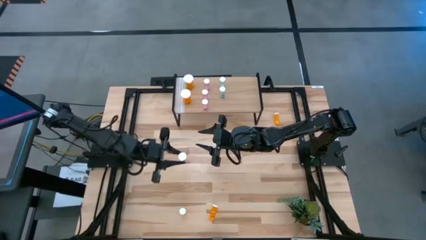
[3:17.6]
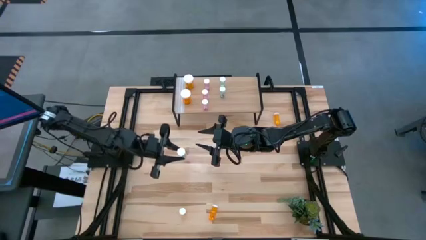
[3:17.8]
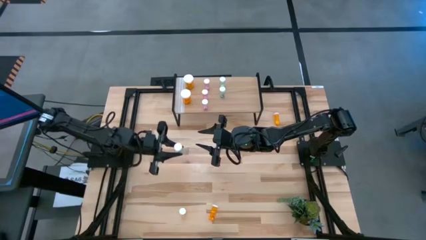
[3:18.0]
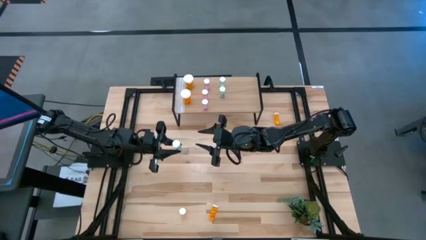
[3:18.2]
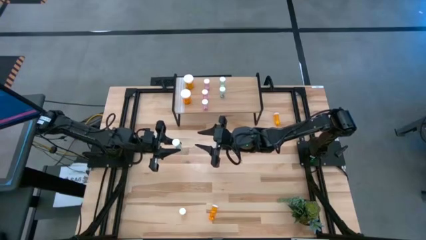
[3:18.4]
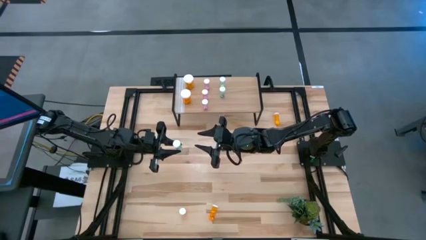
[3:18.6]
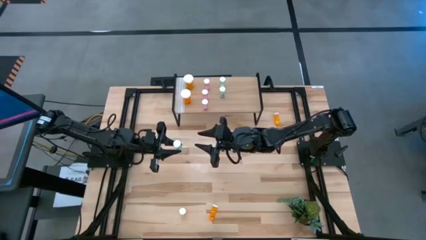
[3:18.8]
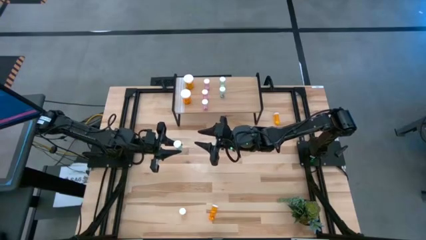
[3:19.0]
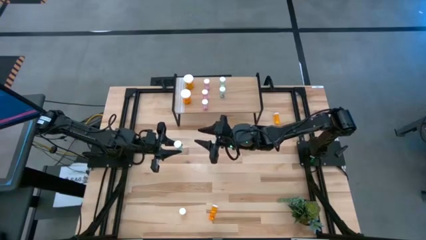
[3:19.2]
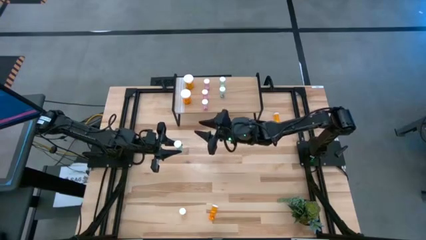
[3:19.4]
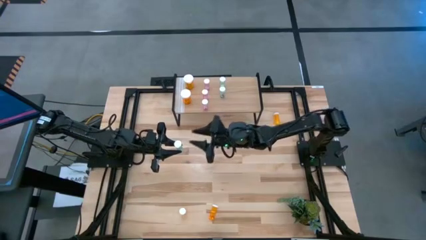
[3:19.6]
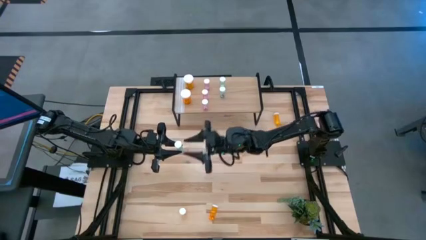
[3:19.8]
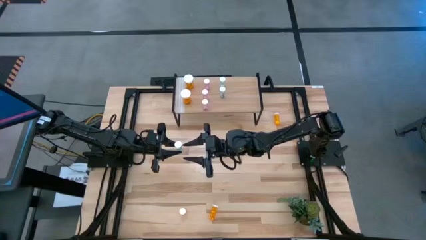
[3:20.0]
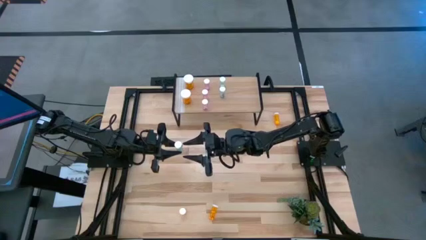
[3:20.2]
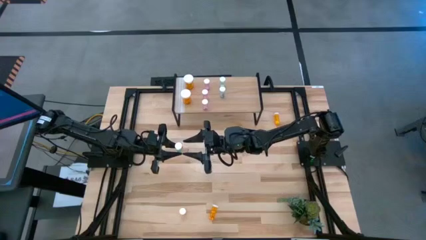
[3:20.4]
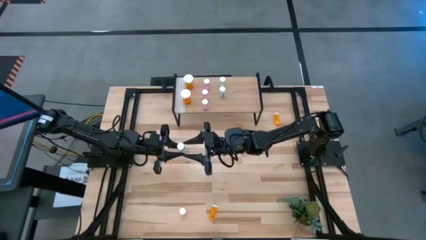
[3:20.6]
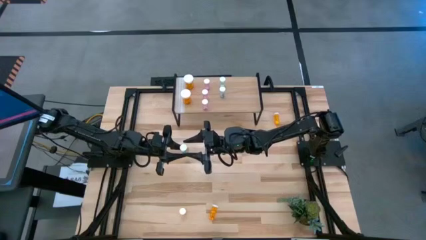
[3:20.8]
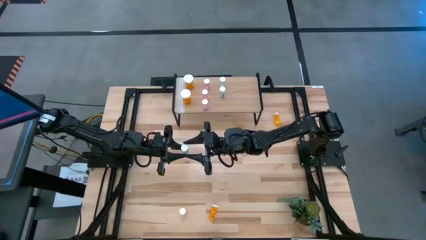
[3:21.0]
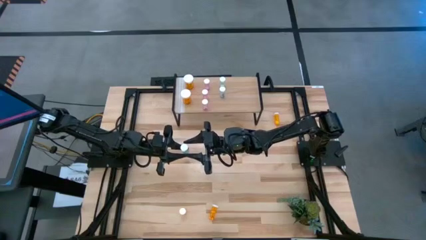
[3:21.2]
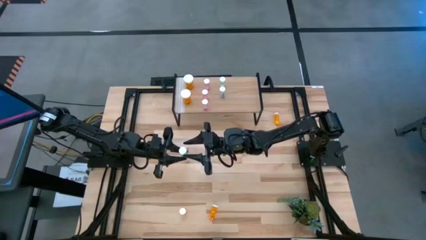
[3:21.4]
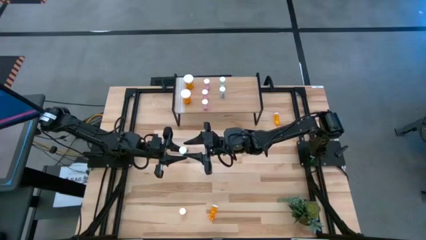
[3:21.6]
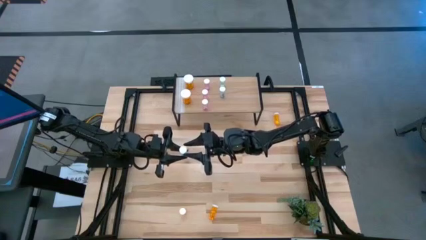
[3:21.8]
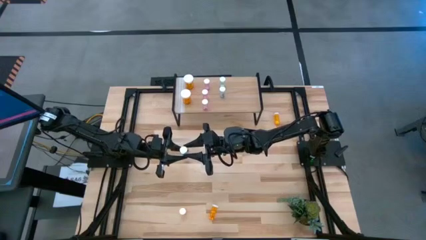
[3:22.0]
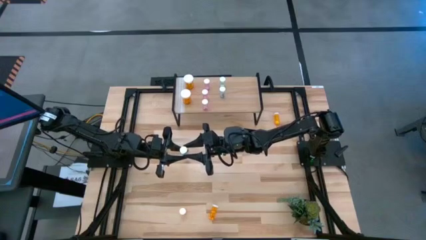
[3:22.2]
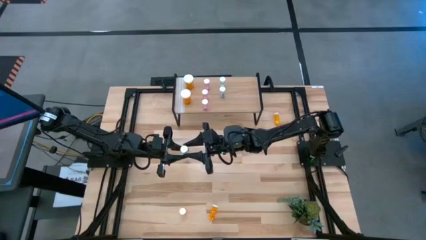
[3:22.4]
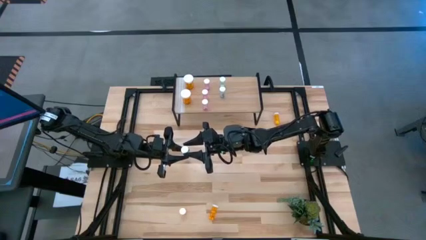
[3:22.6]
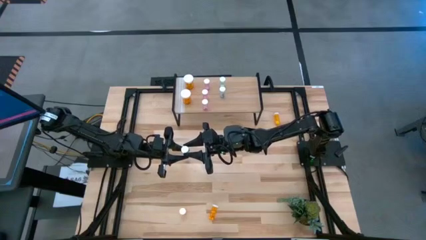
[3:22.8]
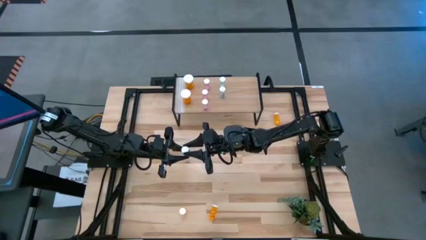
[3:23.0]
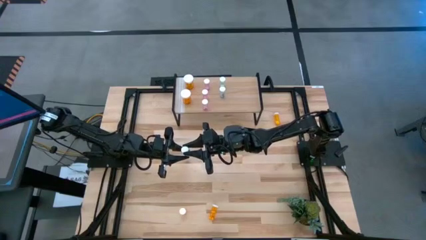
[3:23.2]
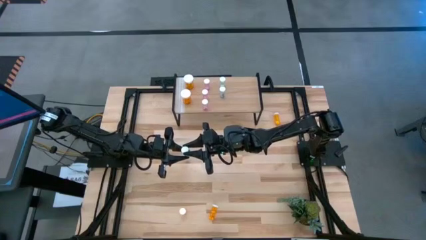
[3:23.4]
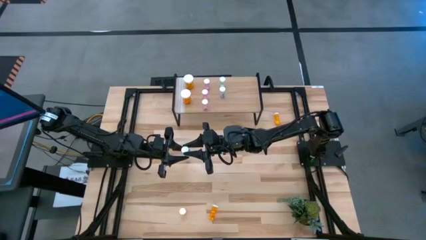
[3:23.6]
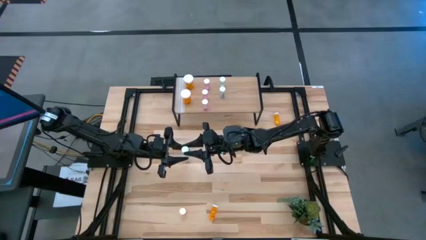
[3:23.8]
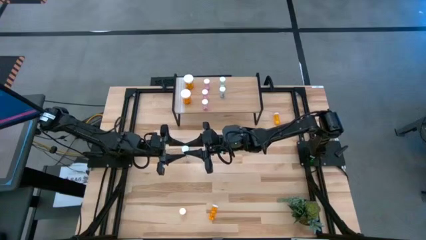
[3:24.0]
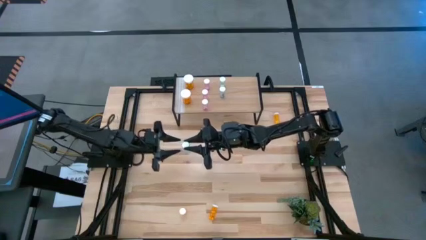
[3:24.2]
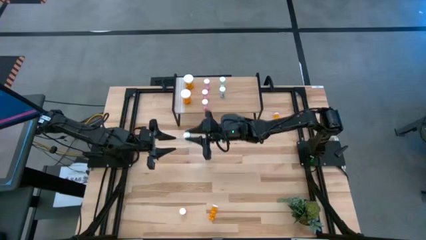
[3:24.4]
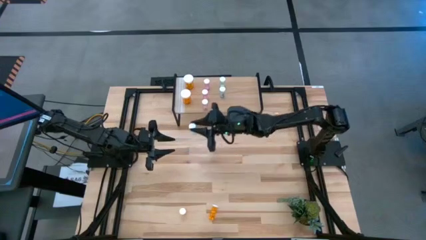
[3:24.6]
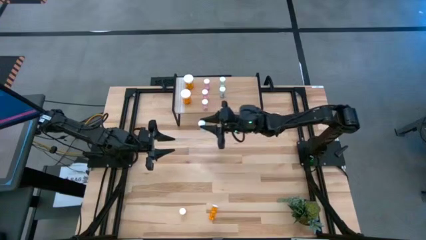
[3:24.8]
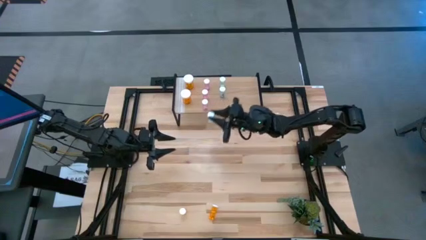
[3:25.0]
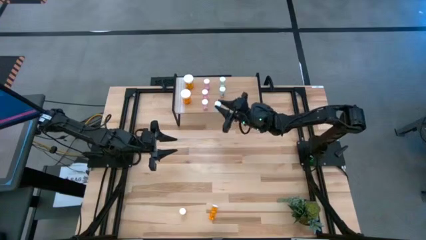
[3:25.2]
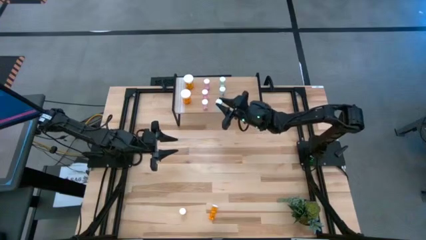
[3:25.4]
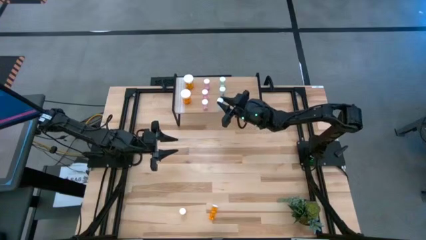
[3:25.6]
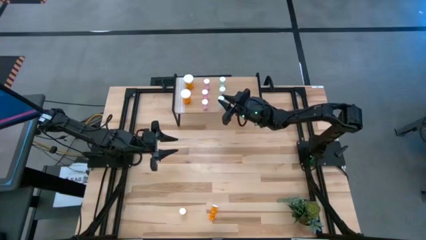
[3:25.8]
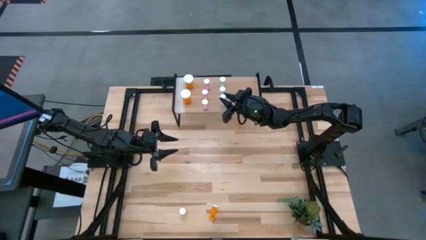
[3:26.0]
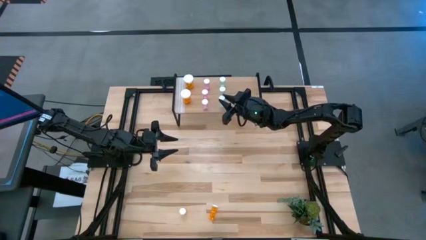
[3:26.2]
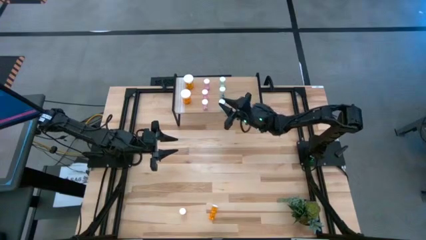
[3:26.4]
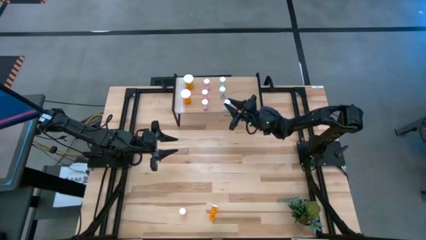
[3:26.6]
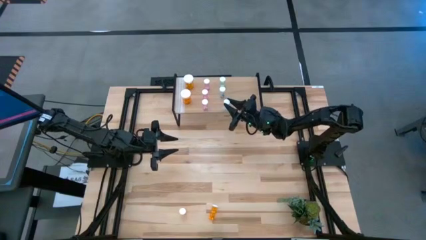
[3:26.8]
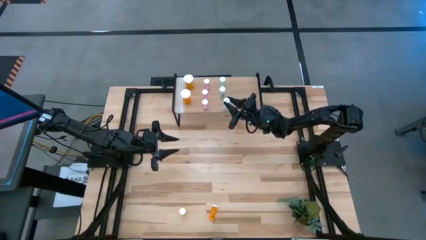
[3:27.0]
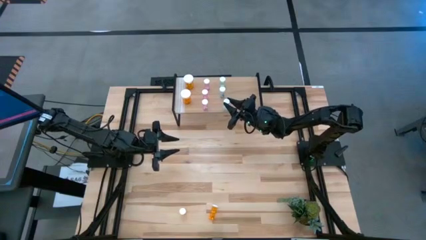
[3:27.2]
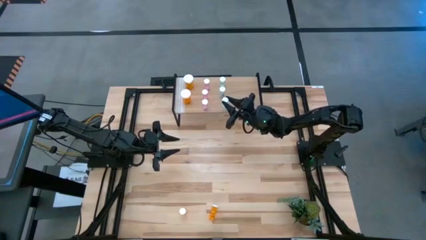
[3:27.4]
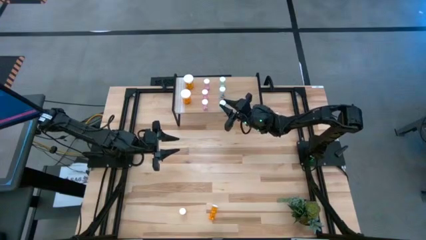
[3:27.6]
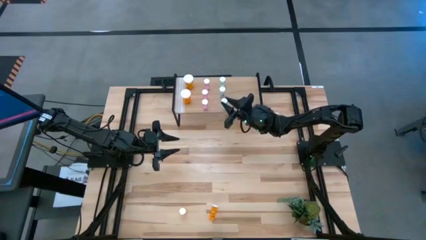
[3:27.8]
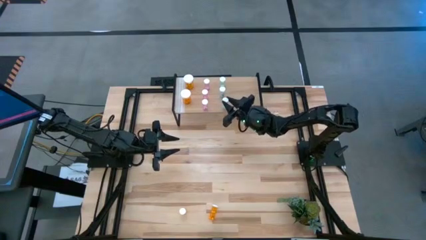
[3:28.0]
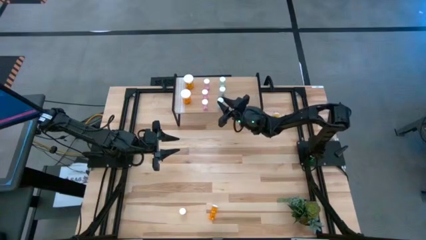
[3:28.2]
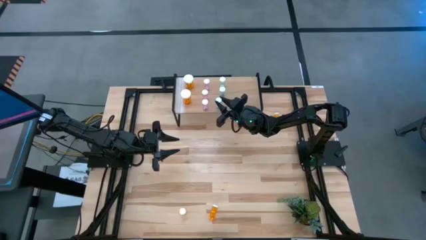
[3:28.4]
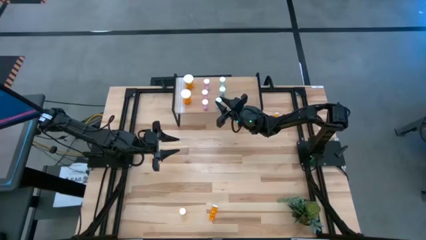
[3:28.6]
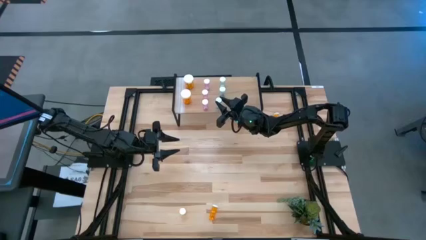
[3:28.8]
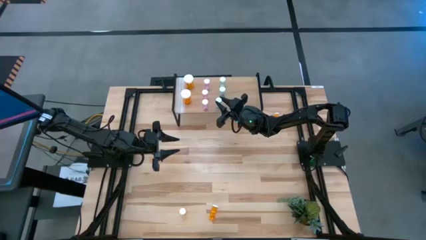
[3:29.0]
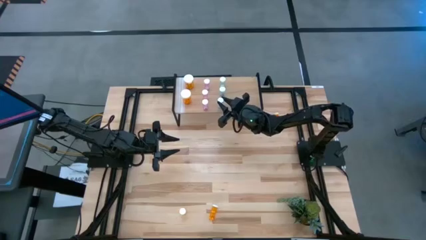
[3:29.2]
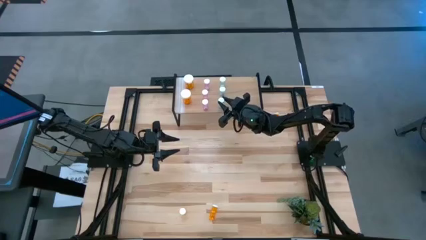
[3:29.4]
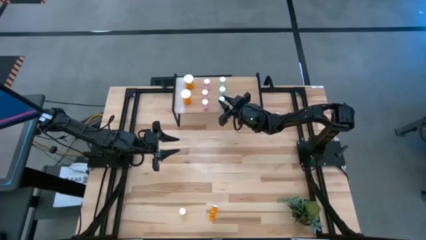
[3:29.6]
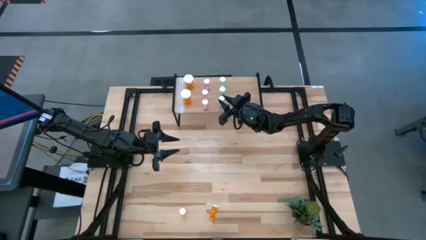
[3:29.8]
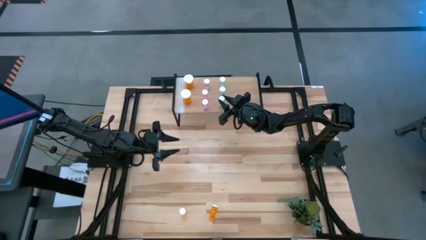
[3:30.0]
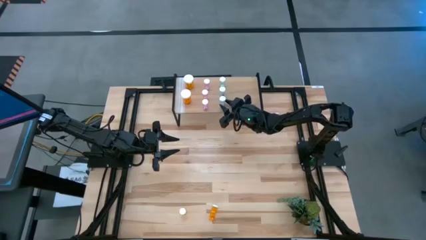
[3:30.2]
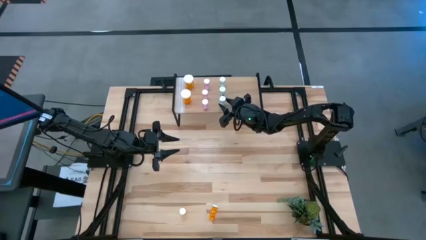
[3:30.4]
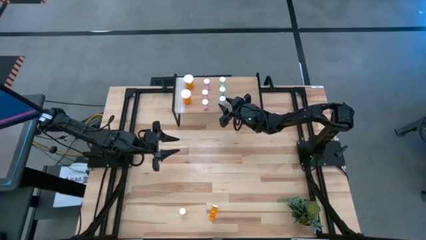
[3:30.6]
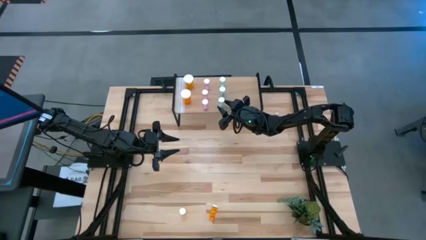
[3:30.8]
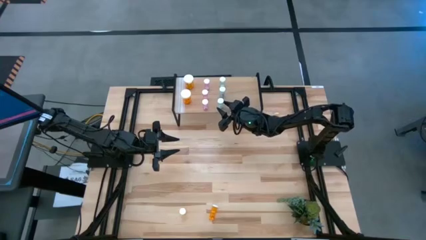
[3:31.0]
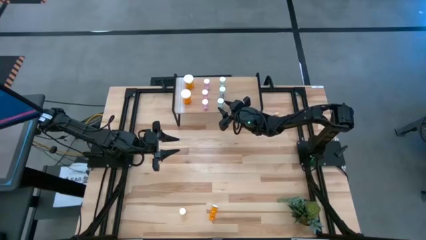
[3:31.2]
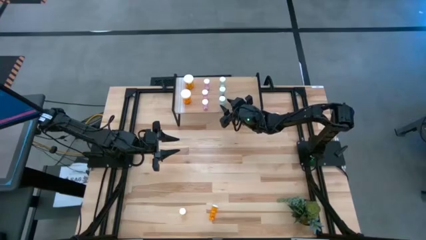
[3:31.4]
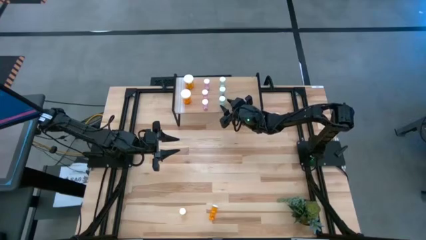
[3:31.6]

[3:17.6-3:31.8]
Task: Pick and place medicine bottles onto shelf by color
Put the small blue pill bottle aligned with other small blue pill bottles on the shelf

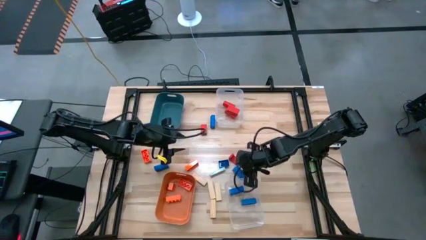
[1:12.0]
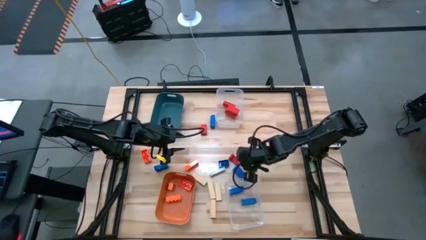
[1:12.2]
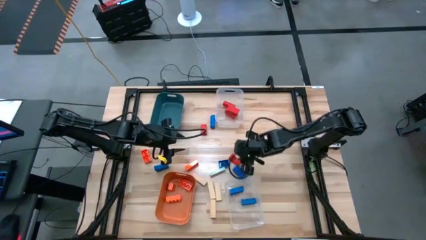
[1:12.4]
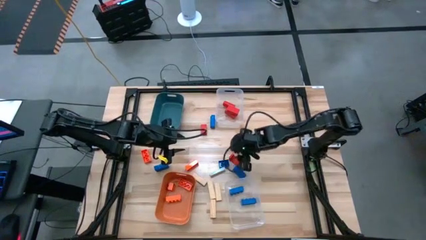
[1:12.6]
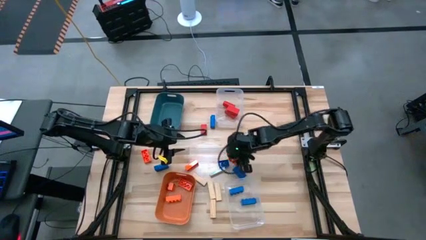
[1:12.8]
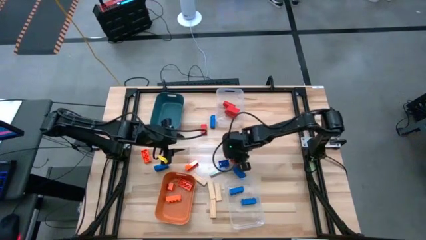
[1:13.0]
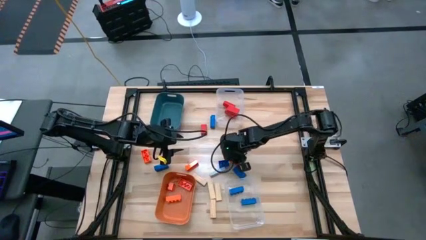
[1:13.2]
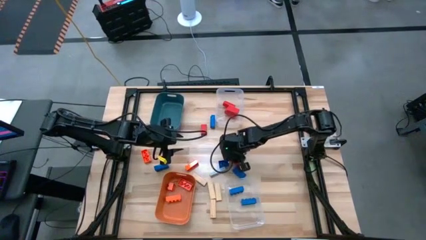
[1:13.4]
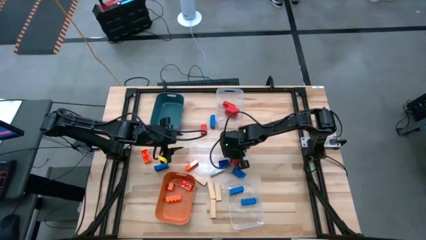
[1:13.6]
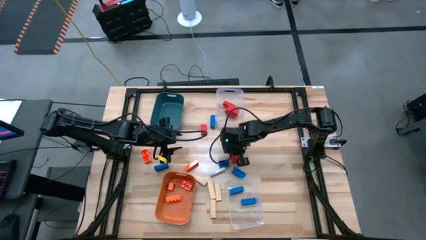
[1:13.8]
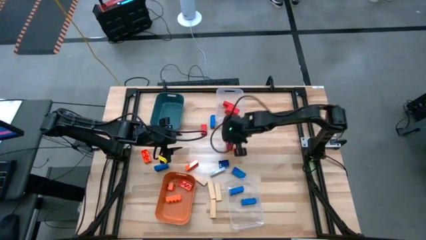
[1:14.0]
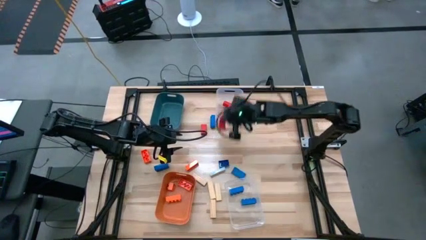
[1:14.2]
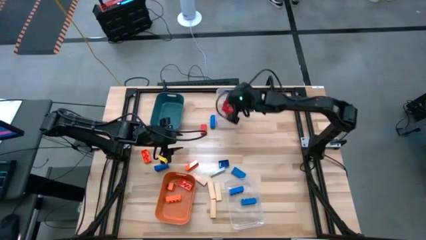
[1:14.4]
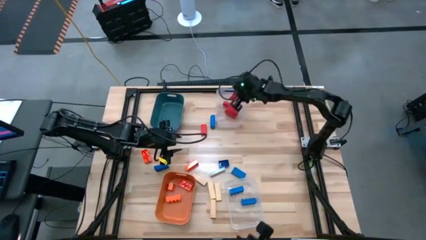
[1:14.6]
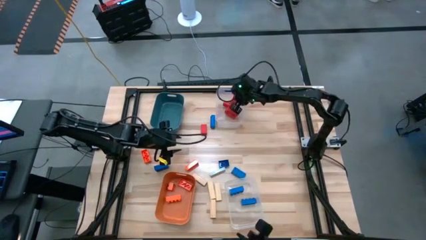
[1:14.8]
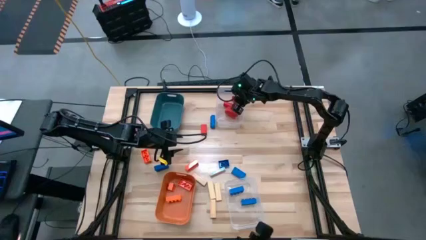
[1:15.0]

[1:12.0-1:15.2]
Task: Sort blocks
Put the red wooden block into the top transparent bin
